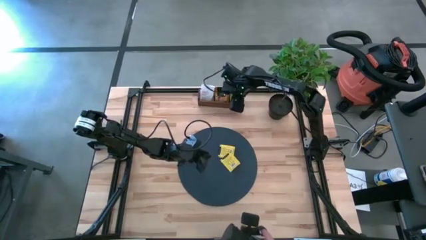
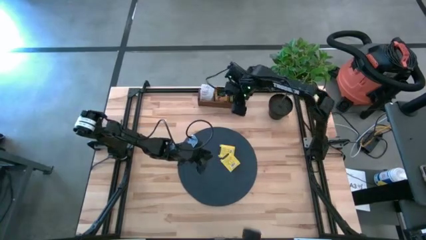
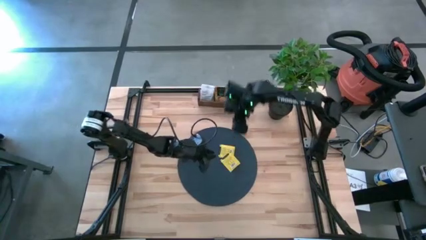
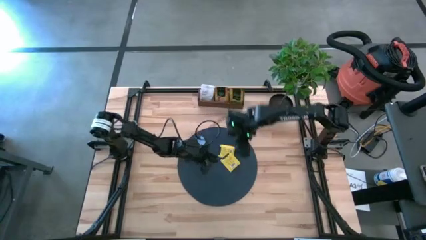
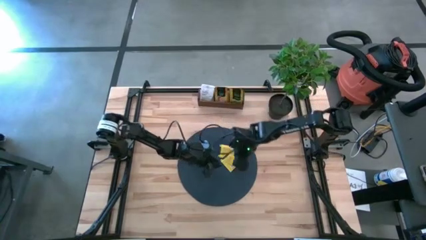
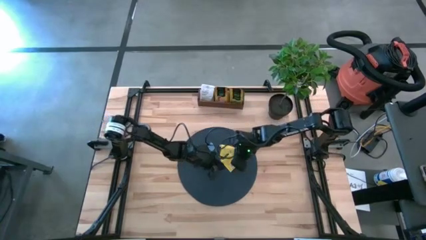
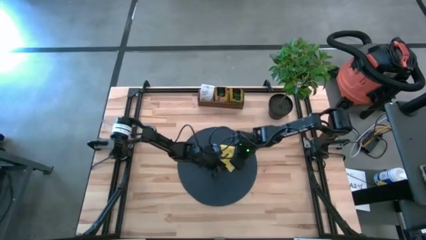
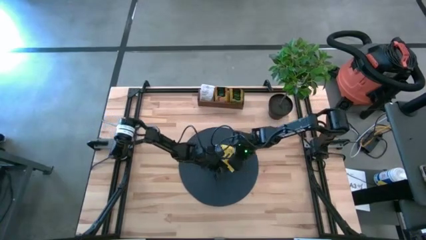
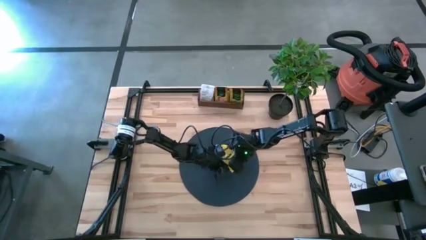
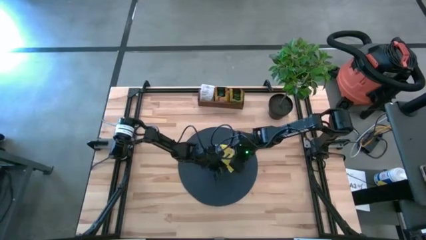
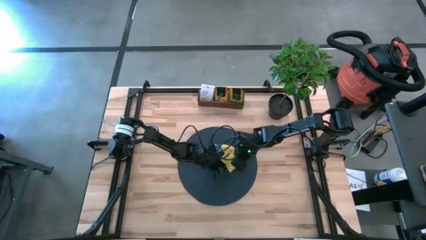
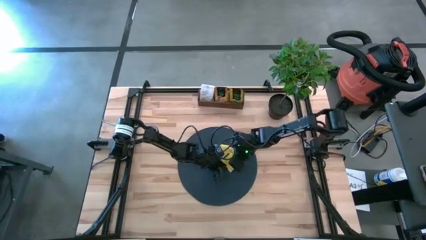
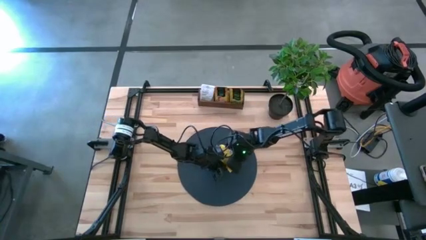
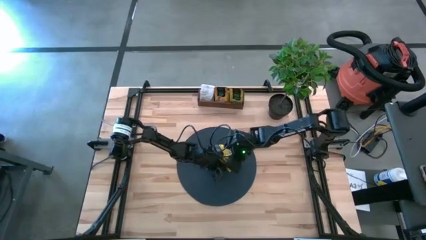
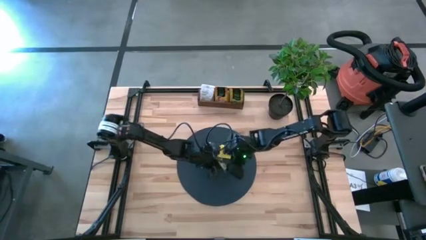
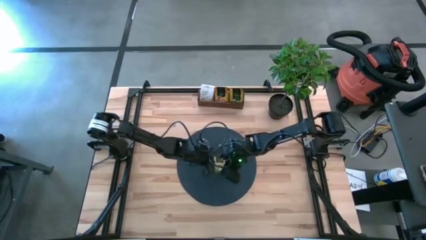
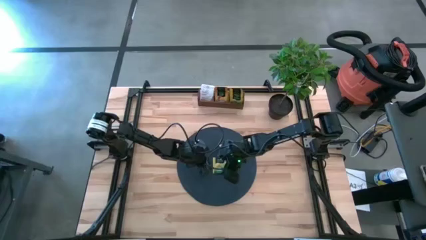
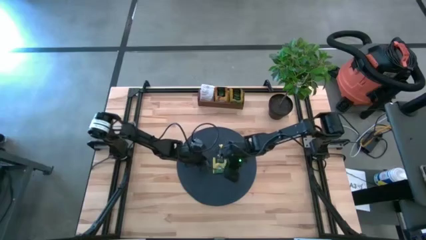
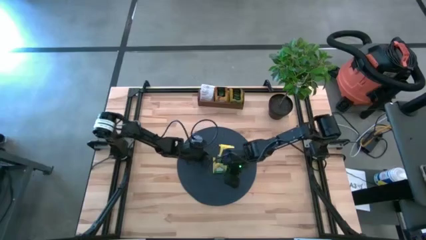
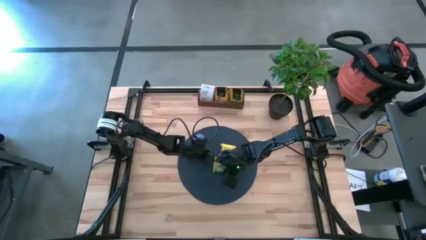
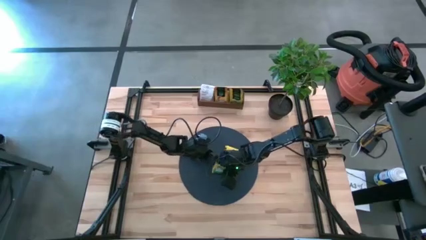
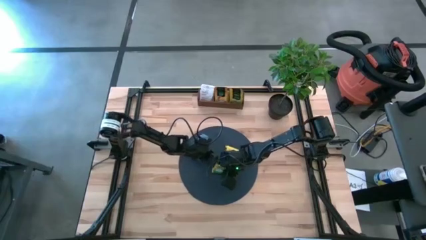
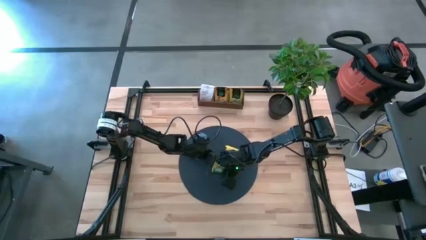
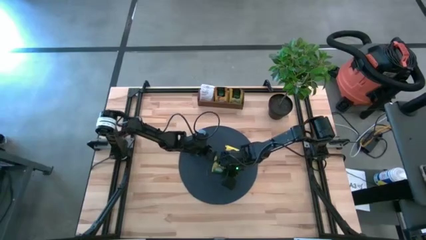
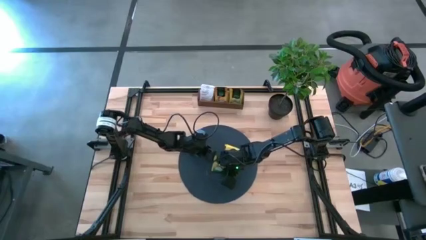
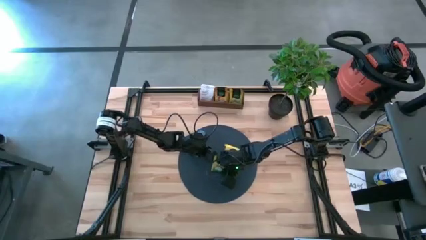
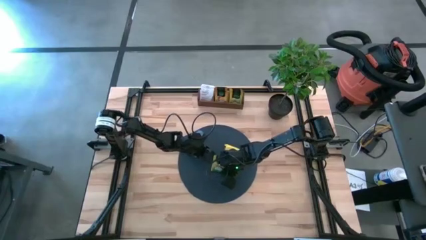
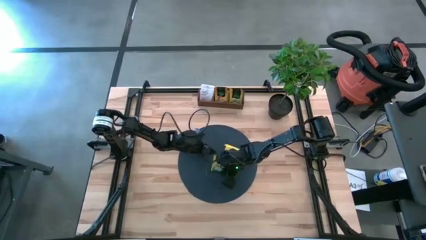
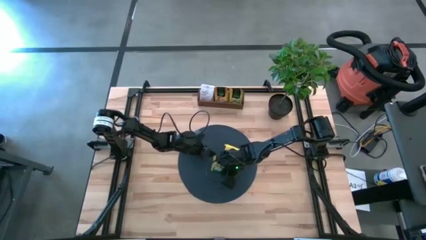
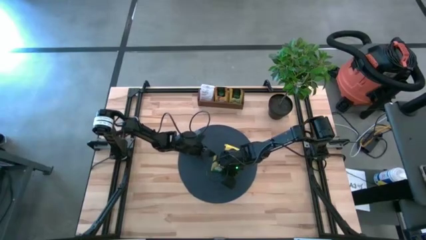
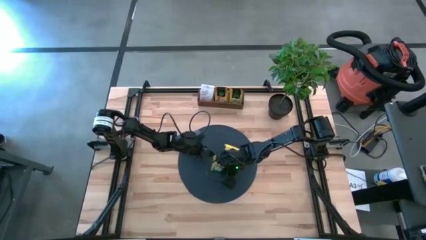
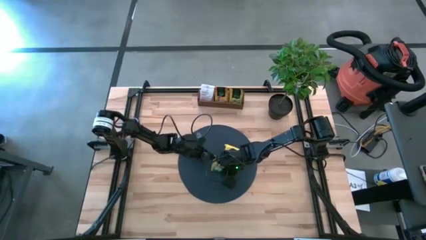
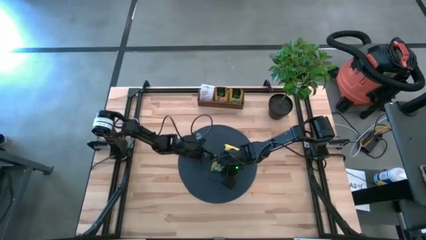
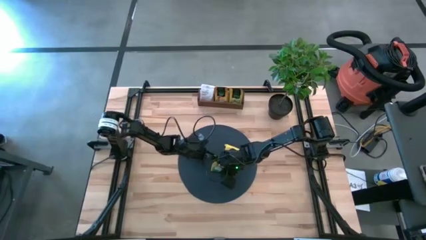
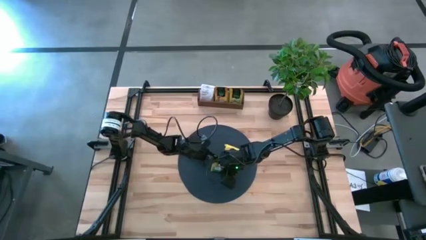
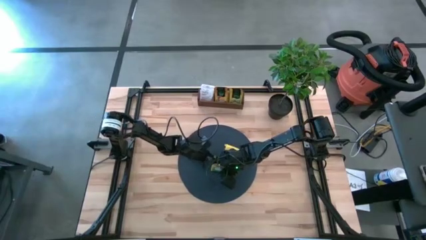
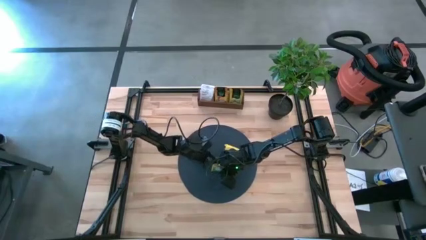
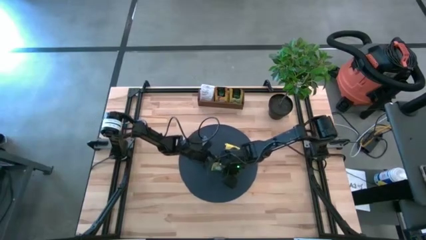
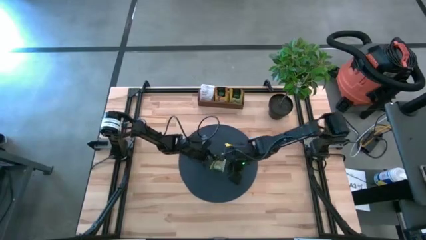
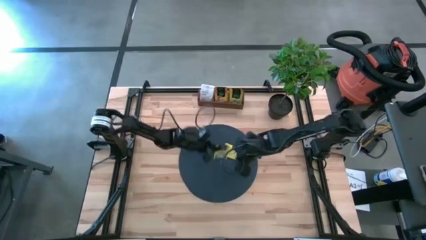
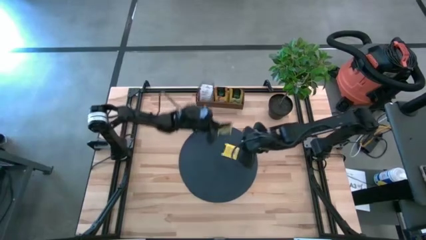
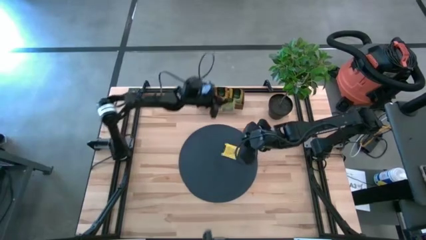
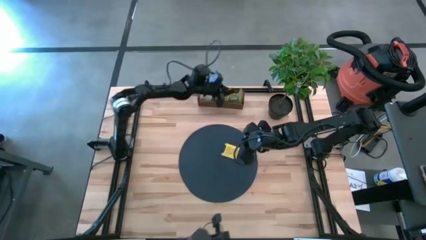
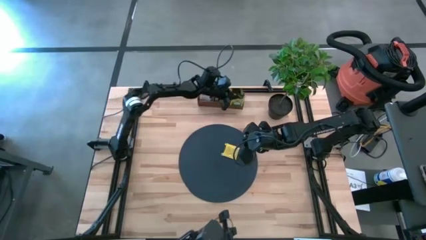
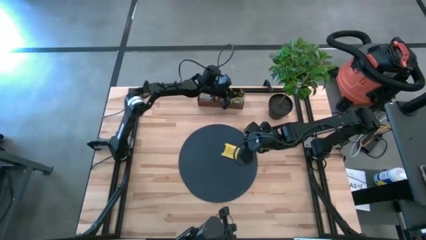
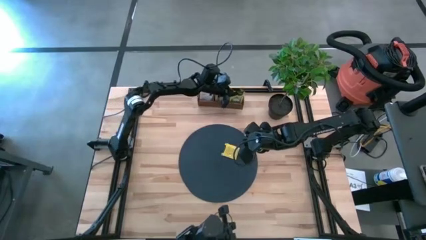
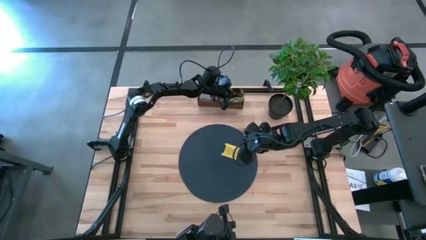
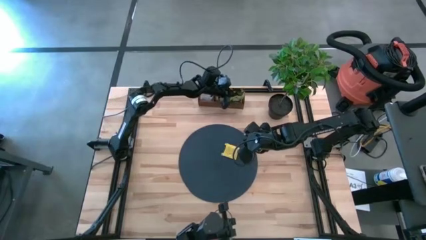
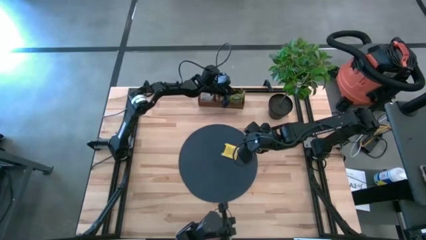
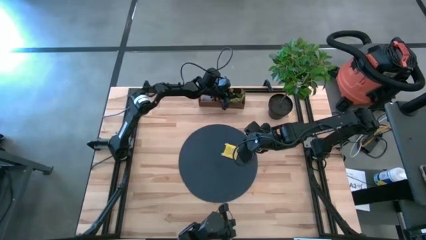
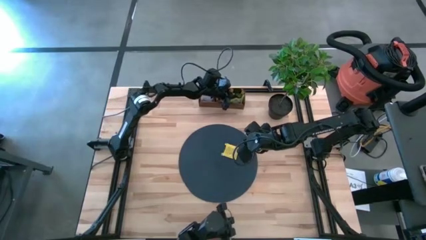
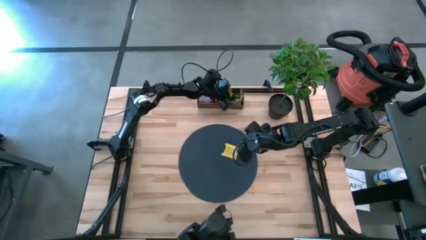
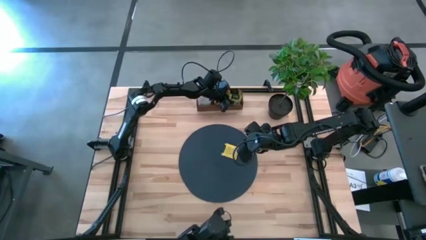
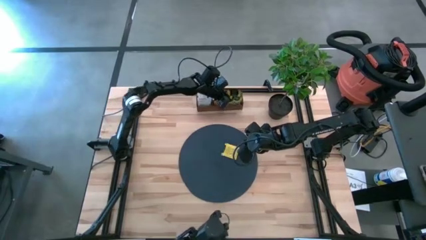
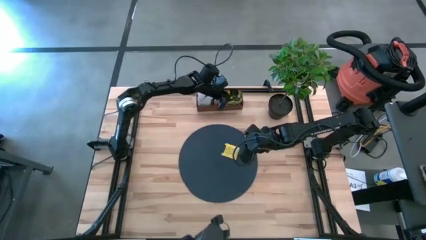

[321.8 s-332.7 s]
Task: Pick & Place Tea
Put the green tea bag into the right section of the wooden organizer

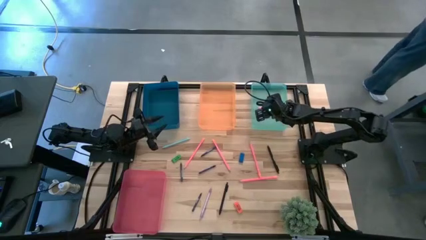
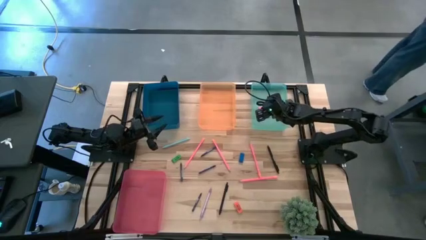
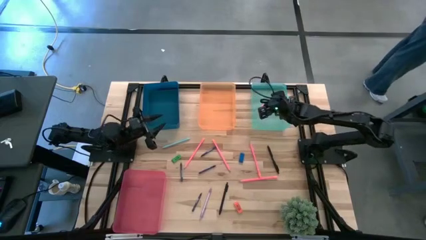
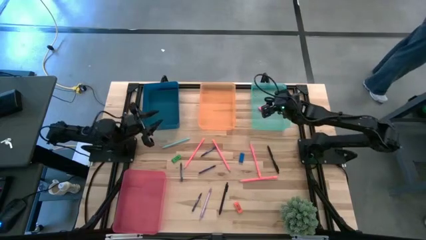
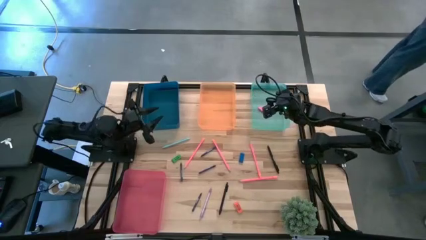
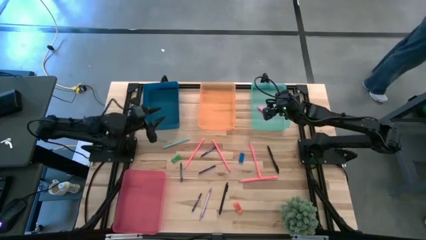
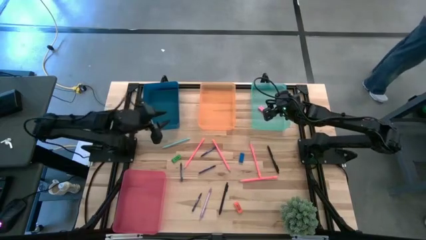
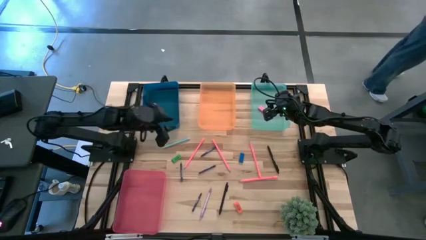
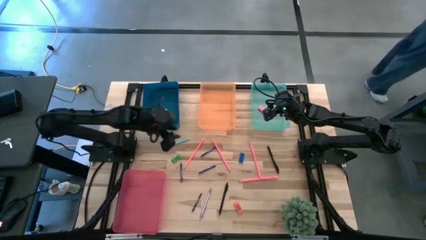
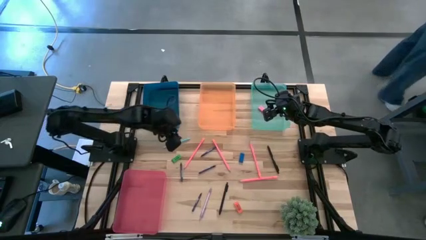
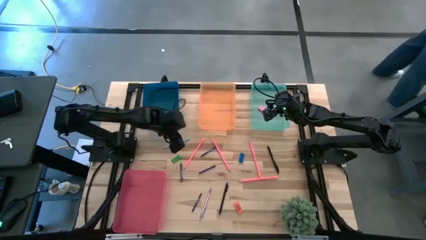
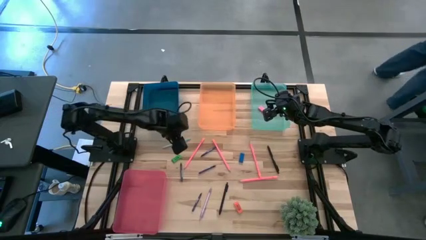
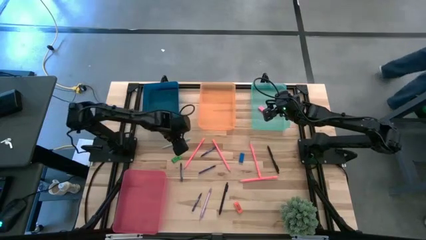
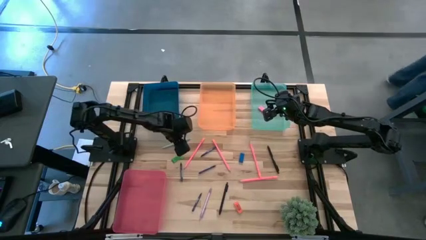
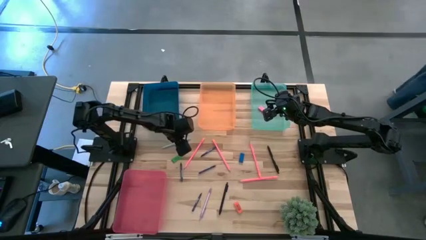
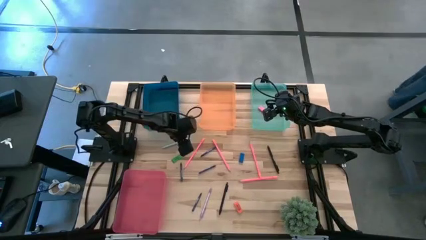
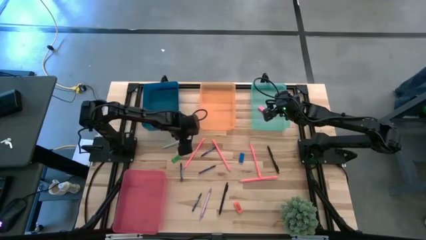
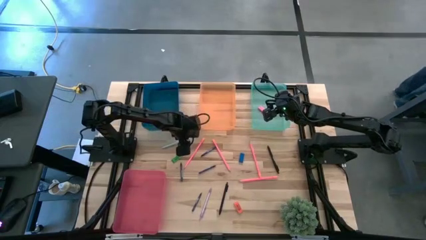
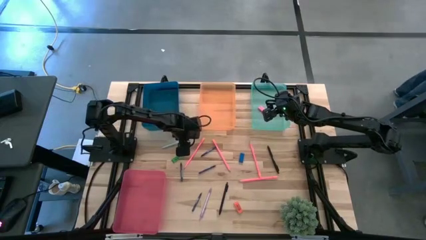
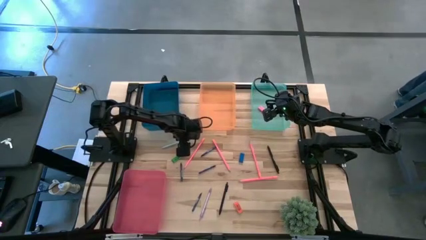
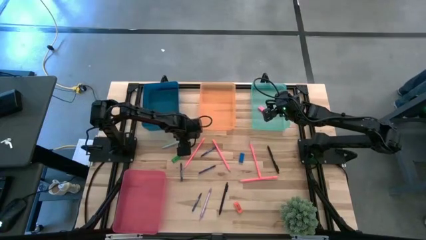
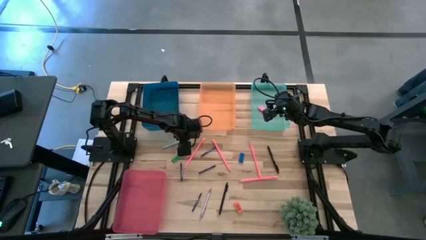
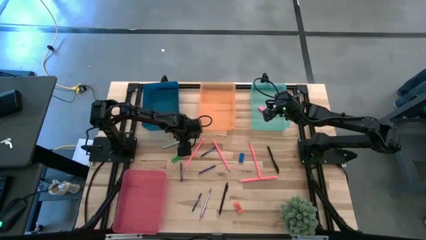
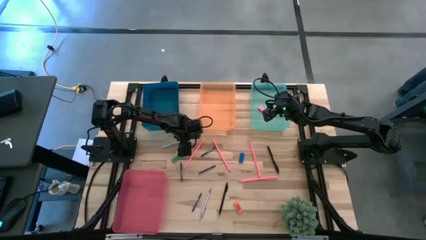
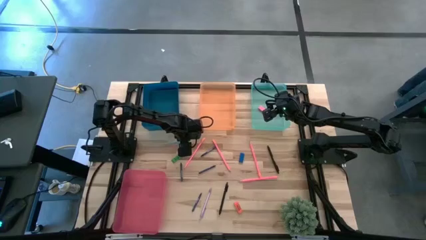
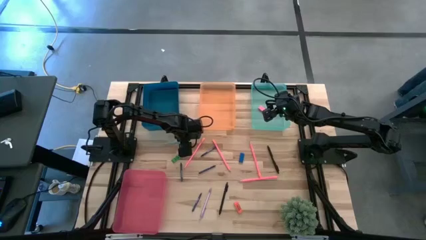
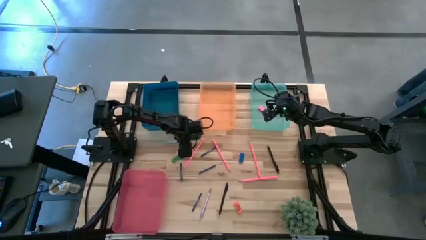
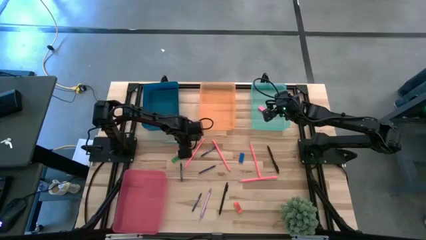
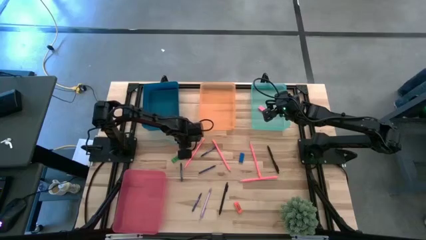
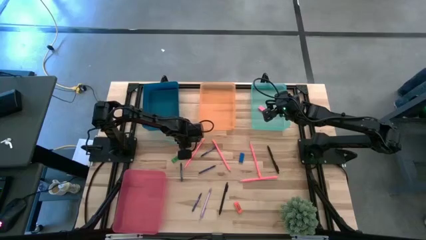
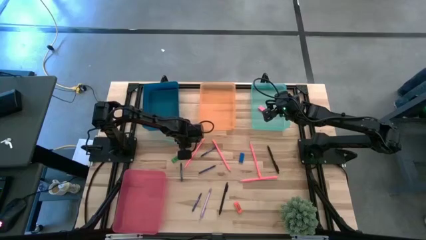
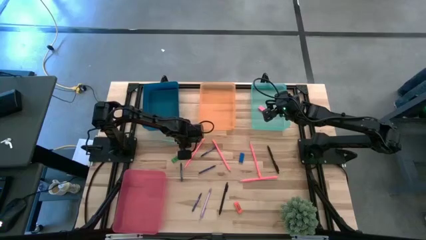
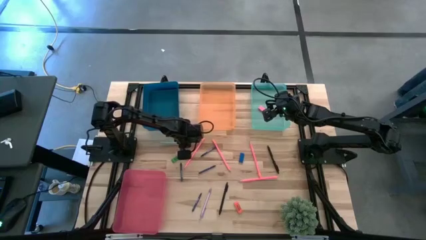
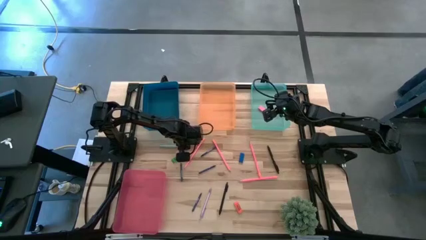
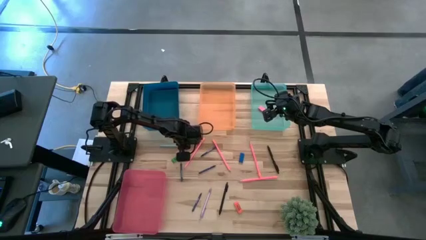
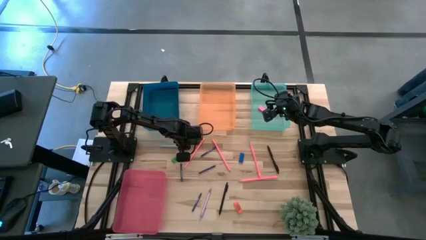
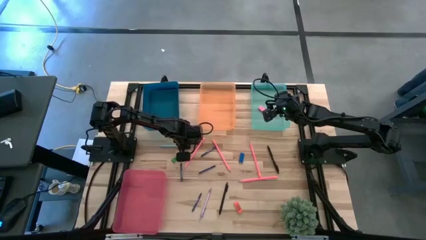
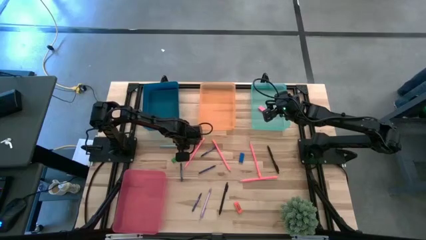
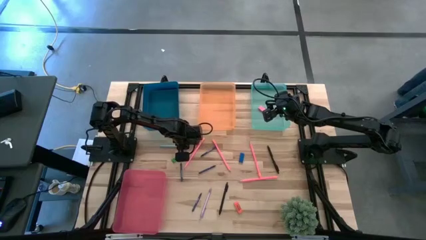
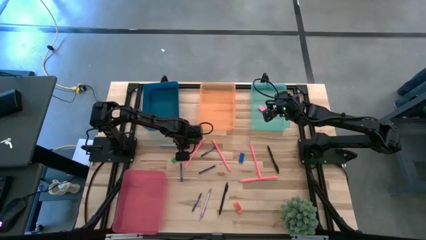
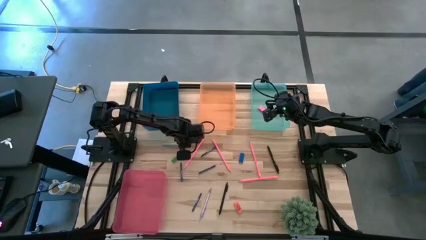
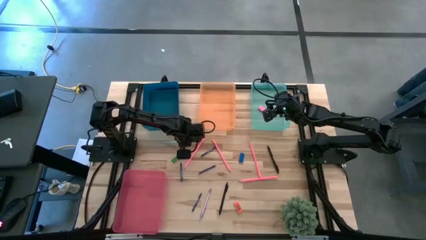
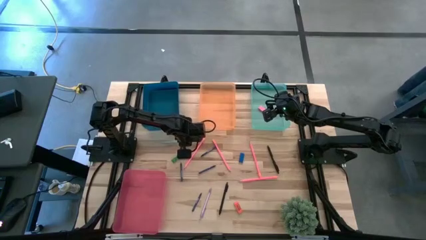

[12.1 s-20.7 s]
Task: Sort crayons/erasers/pens/pencils in bins
Put the blue pen into the blue bin
